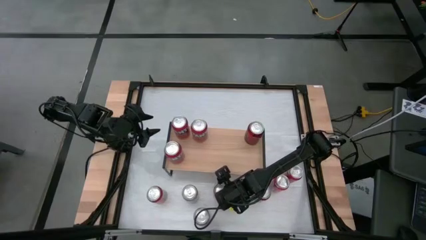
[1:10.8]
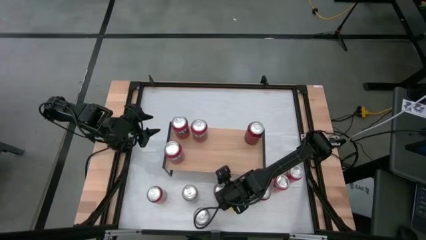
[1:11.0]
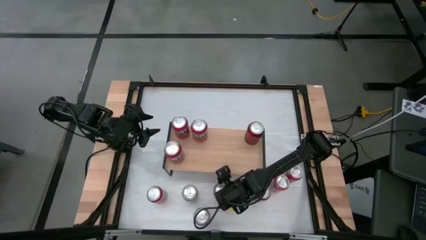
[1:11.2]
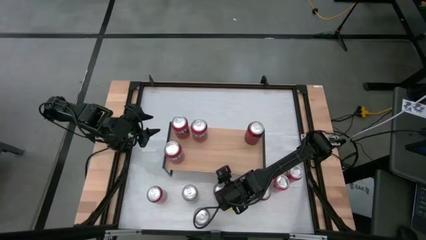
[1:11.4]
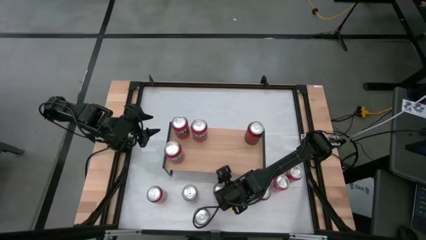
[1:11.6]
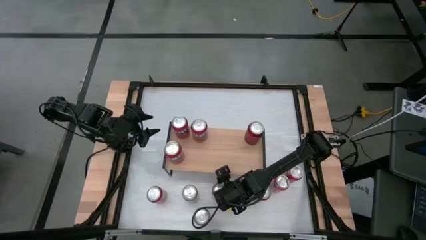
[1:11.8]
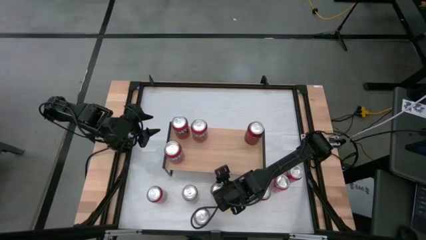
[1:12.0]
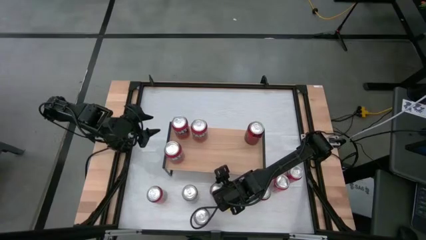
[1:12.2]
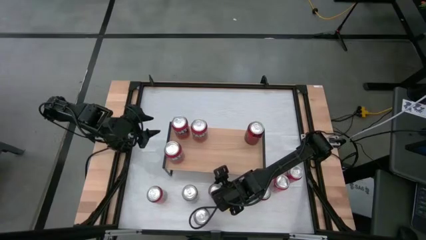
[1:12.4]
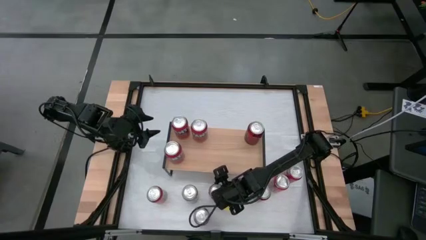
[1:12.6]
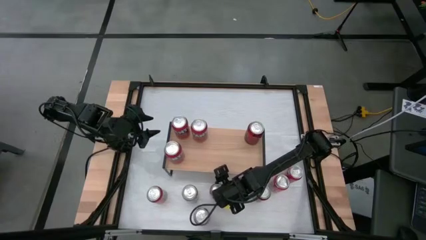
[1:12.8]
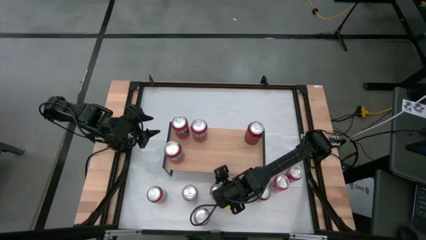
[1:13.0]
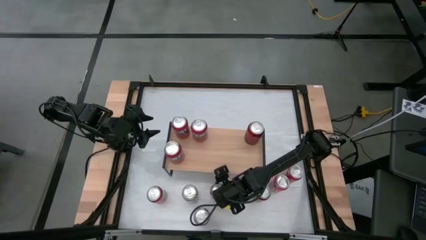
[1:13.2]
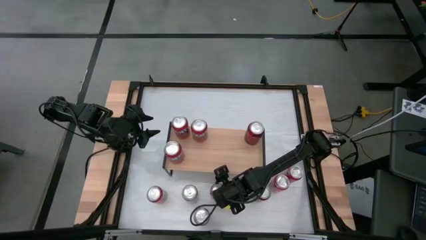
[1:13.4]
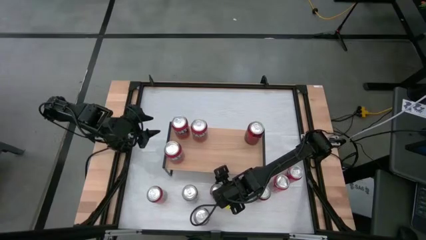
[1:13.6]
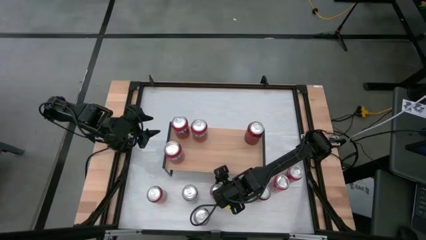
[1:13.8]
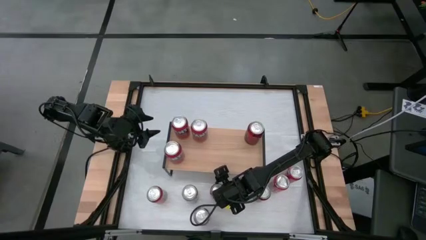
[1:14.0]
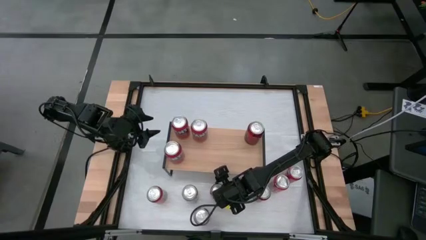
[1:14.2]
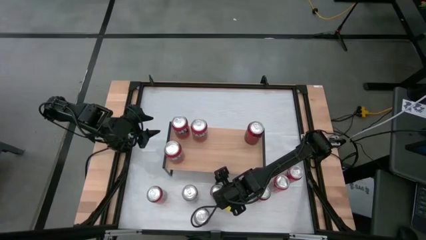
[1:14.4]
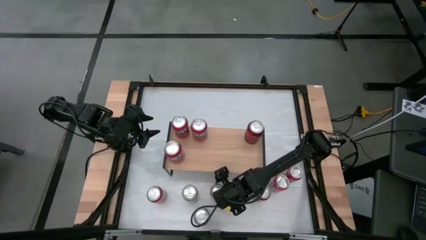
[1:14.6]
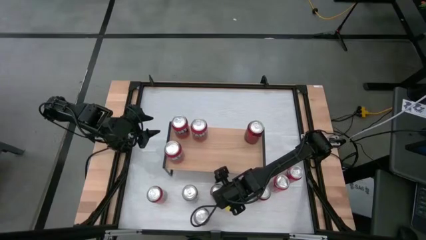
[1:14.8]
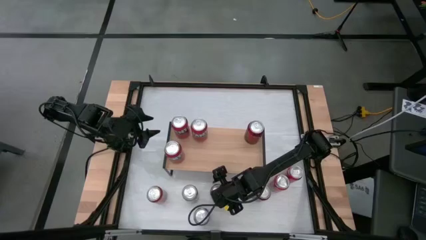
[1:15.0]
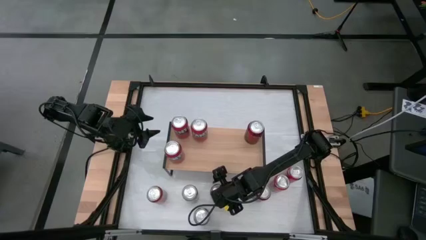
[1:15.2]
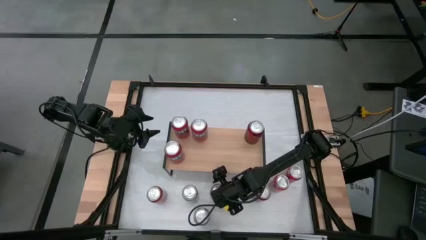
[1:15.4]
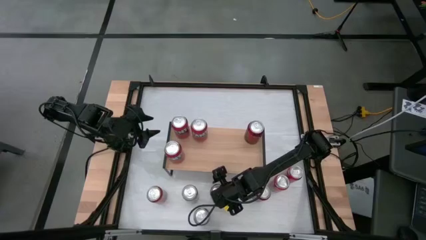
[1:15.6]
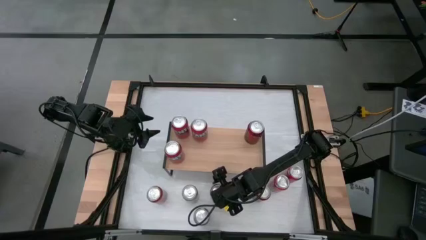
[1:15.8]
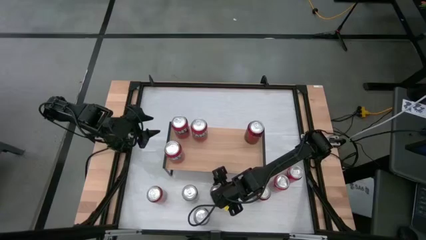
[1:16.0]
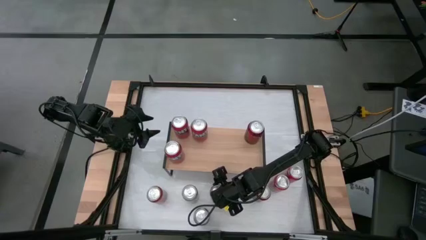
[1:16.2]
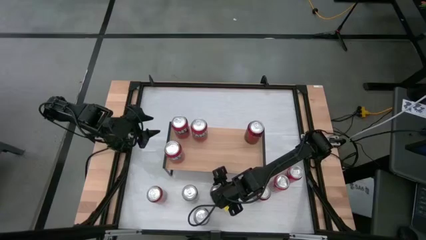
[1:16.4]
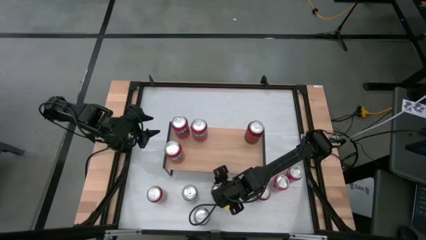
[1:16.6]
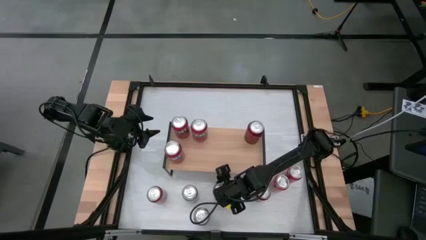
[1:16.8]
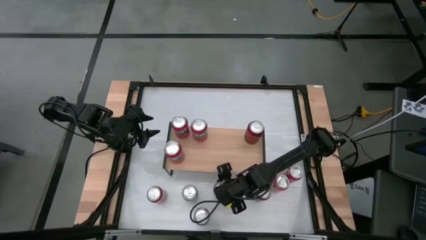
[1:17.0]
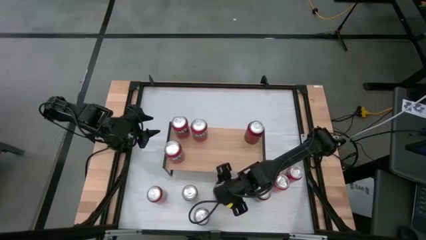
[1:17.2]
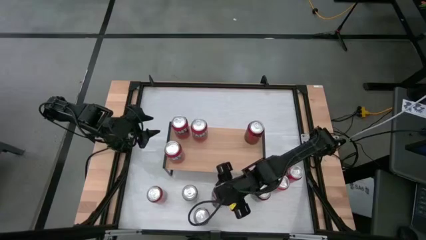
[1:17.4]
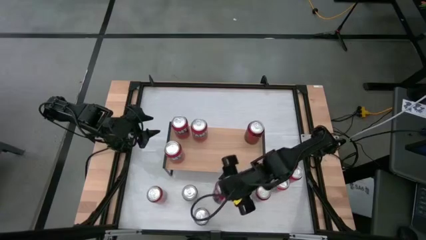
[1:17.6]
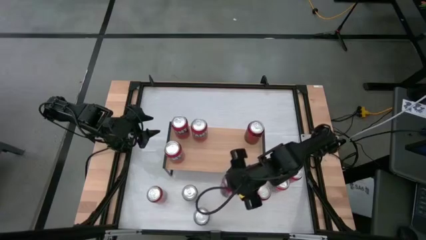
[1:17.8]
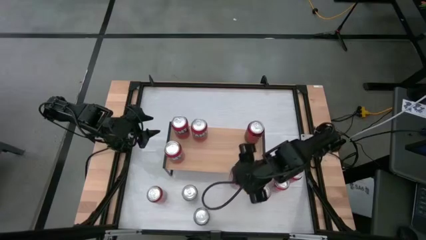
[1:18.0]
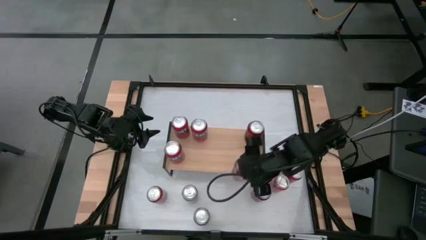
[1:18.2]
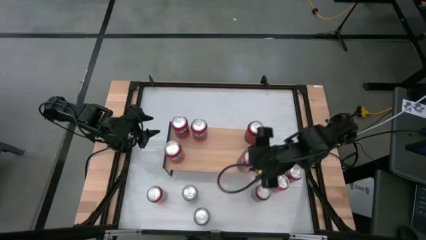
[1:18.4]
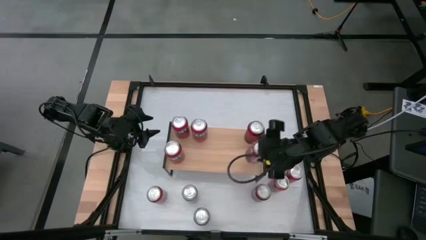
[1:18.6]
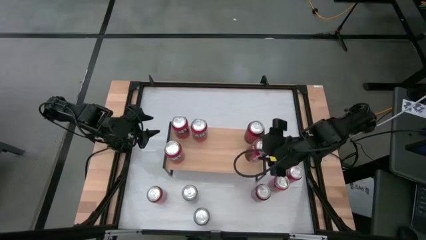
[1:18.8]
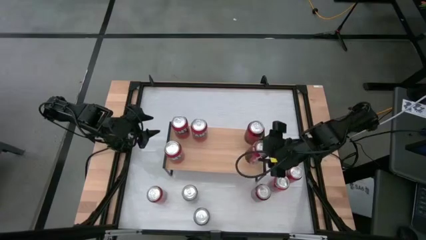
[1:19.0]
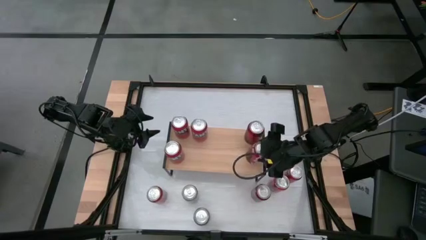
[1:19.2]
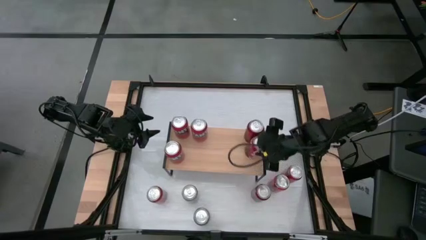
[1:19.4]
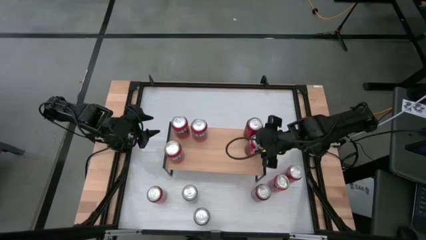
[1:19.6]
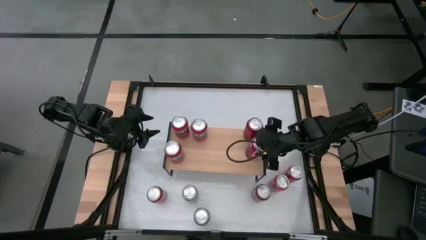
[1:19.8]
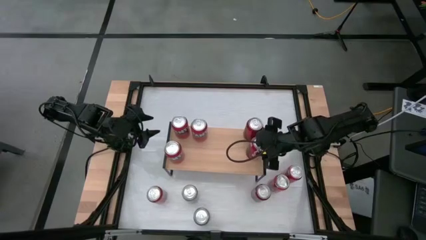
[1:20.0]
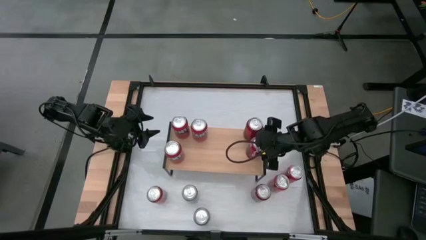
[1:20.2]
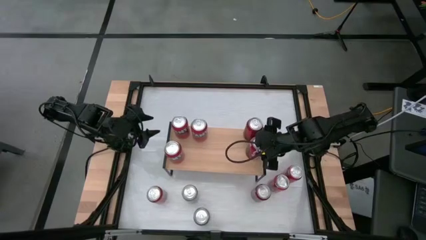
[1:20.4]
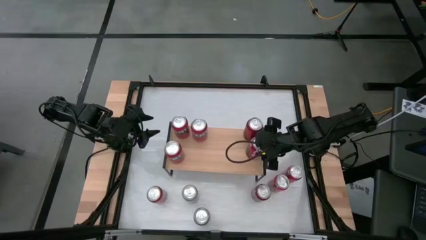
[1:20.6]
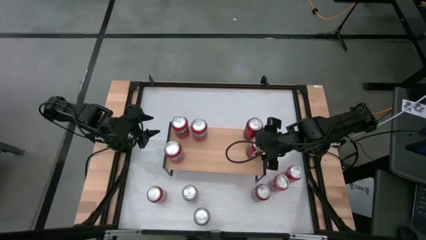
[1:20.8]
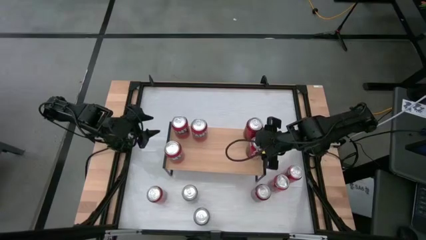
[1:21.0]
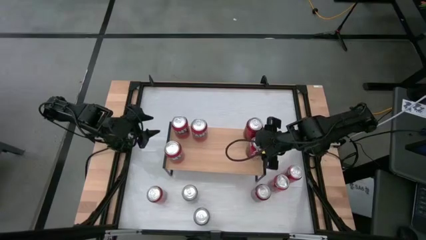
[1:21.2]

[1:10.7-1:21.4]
Task: Place canned beverage on shelf
Put the red white soda can on the shelf

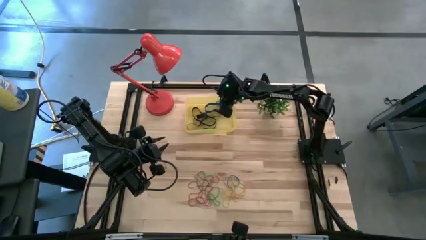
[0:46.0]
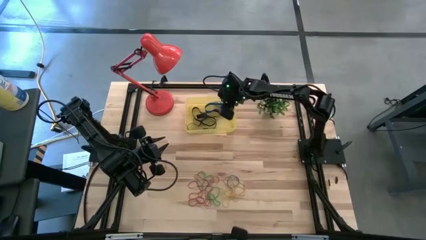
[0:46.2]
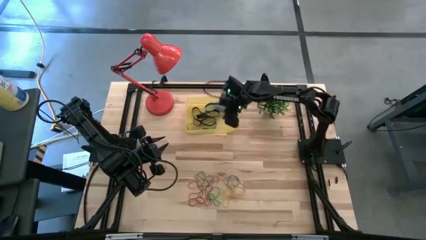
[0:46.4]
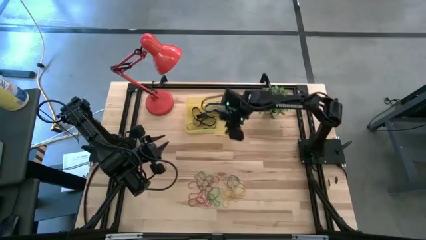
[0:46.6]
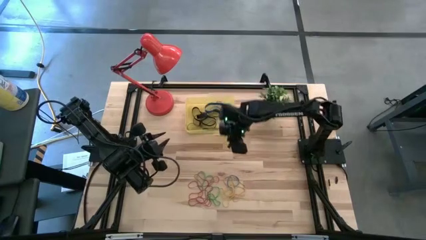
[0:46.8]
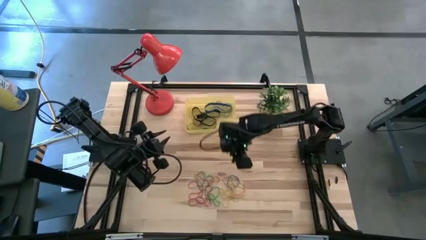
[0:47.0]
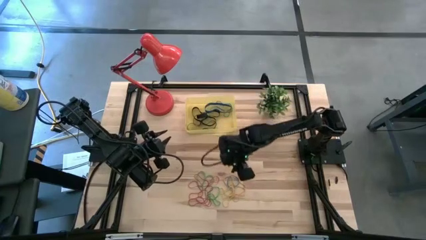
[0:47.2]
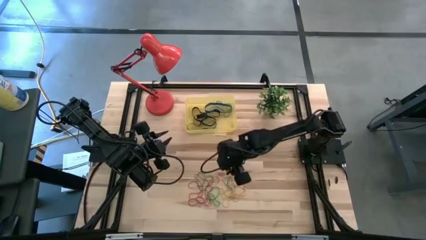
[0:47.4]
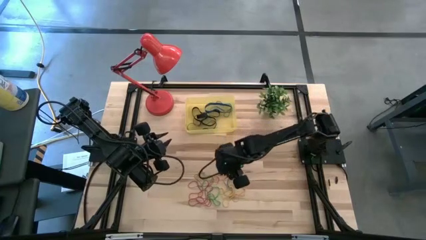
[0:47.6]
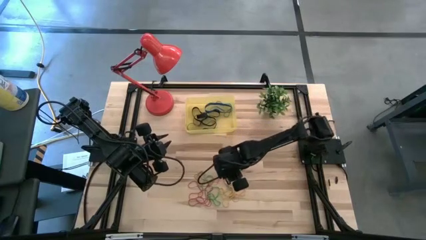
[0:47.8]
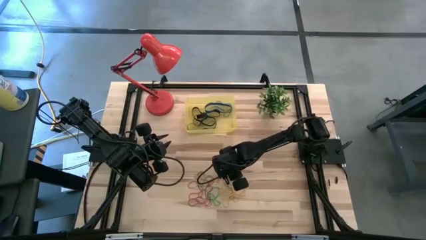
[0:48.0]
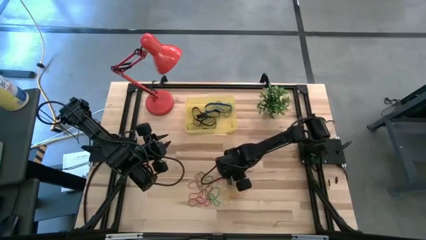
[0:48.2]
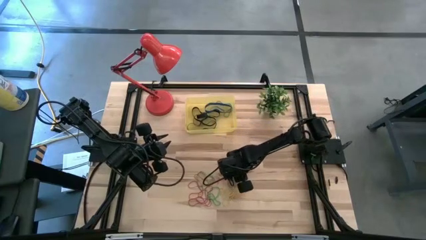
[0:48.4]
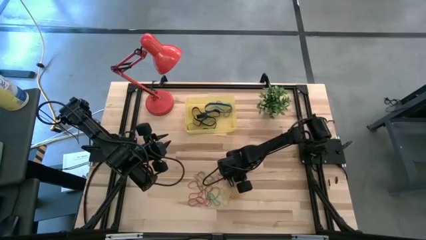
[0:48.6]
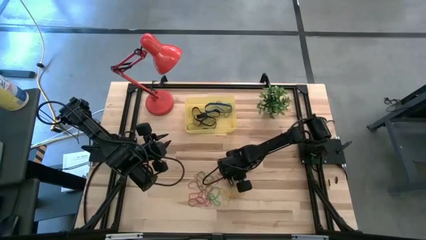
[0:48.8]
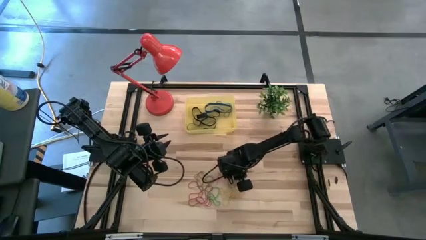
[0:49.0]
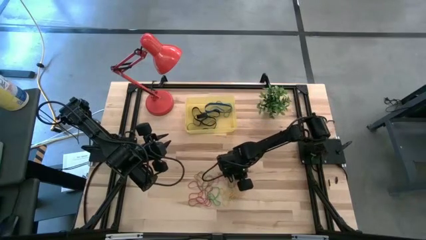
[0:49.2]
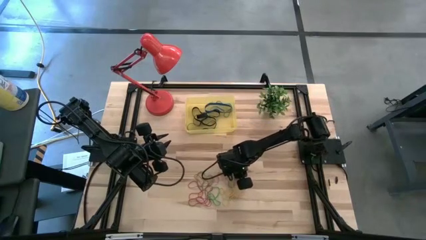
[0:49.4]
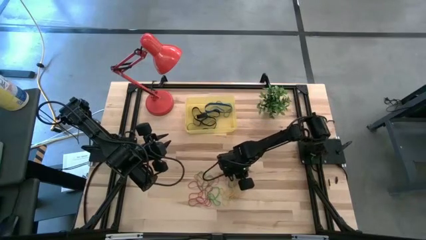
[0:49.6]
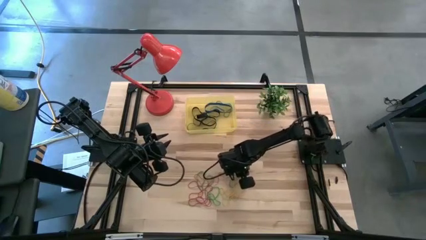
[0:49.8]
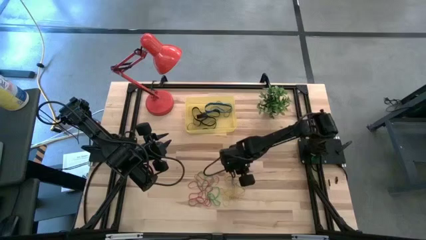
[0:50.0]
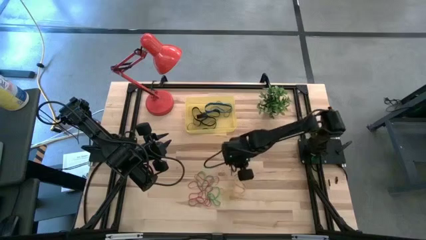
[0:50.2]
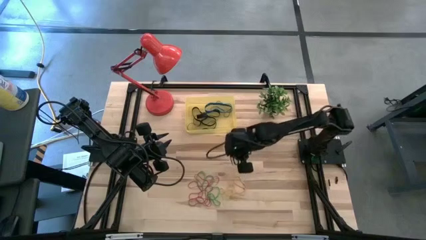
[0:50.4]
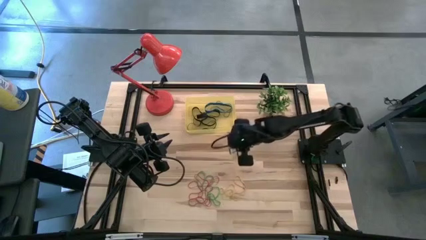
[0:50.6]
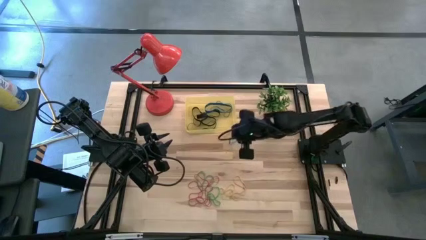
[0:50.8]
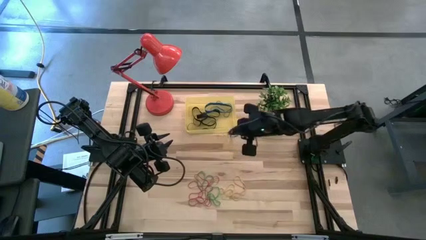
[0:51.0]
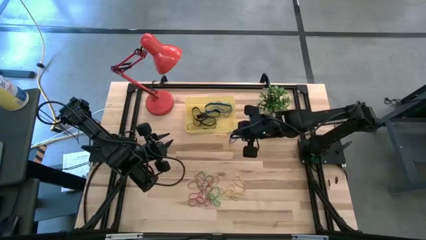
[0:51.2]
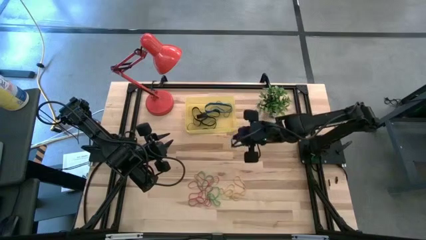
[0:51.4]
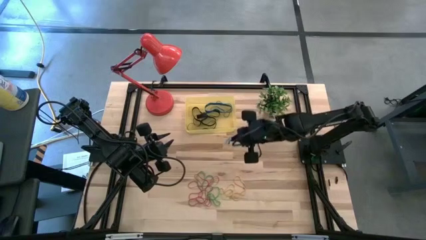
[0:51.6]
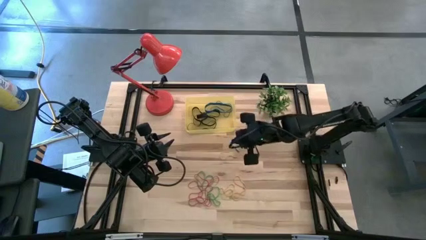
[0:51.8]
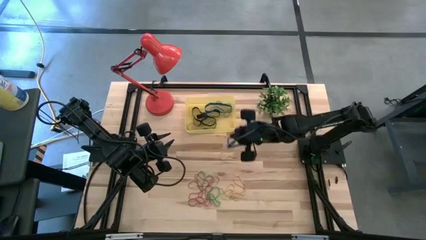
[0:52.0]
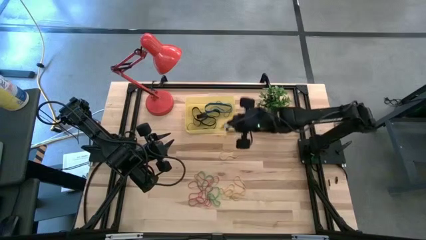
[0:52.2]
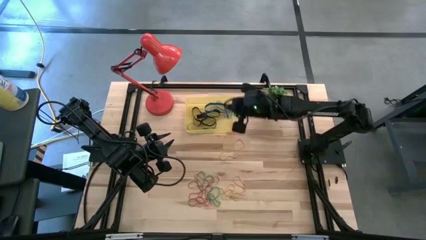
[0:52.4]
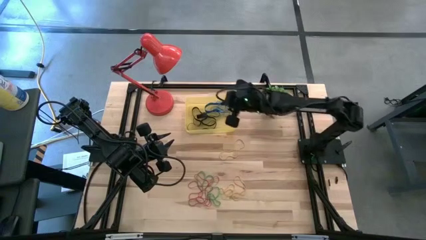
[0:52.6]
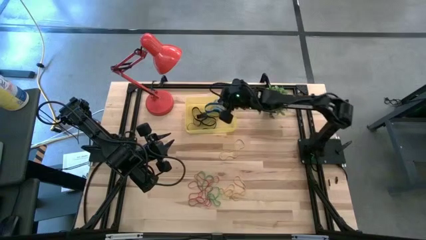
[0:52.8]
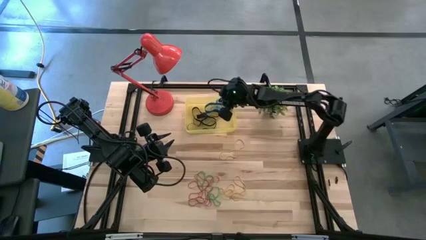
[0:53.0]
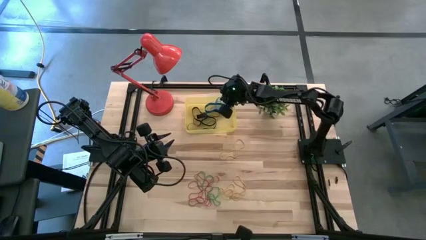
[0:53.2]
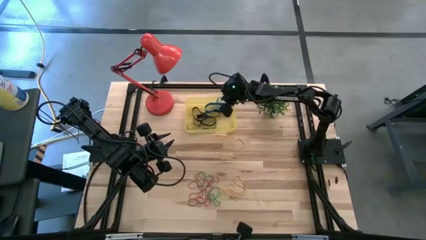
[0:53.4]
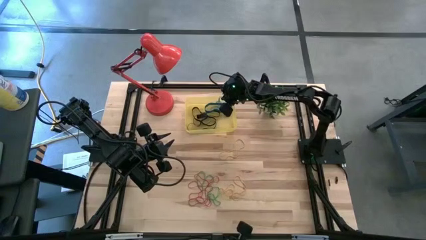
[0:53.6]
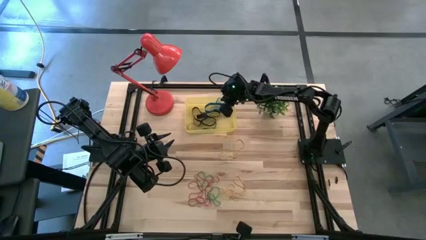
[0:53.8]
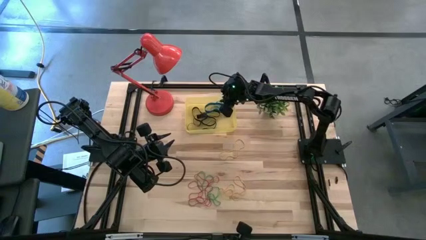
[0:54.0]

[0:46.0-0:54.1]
Task: Pick and place rubber bands into bin
Put the blue rubber band into the yellow container
